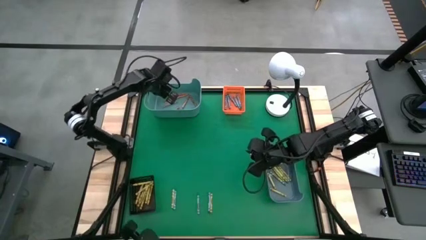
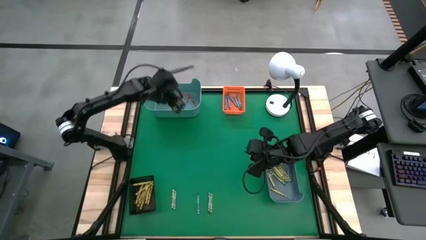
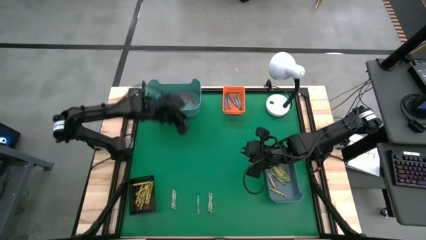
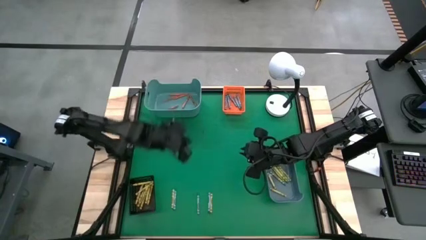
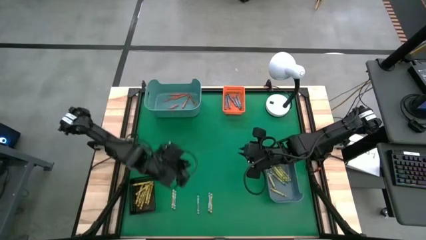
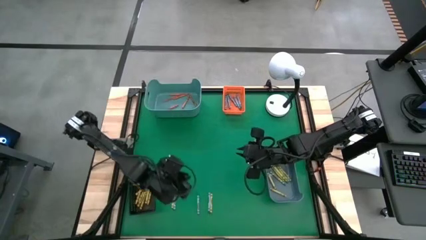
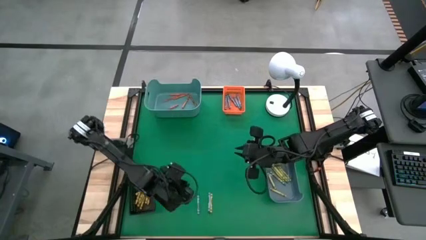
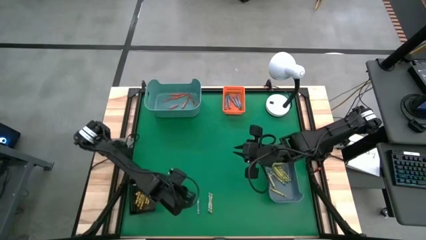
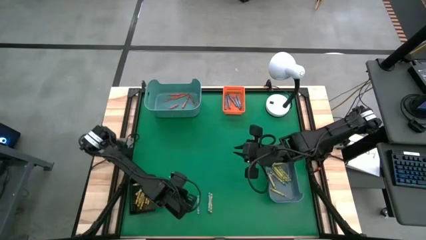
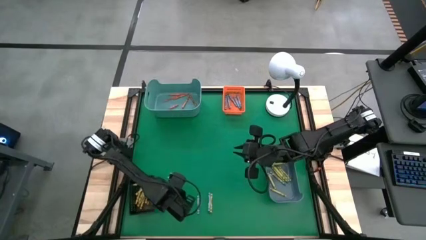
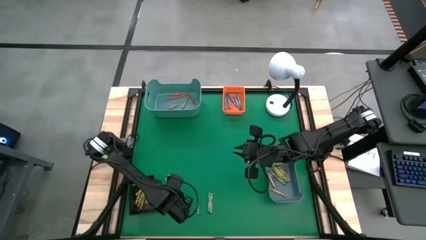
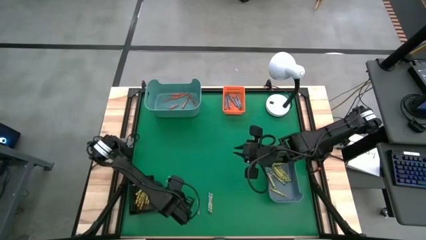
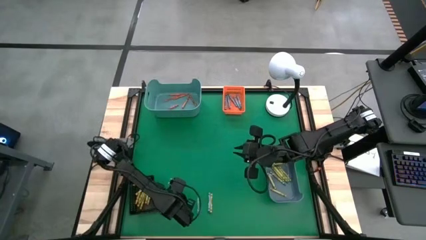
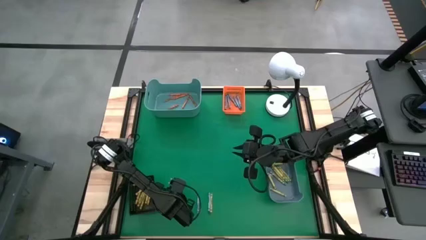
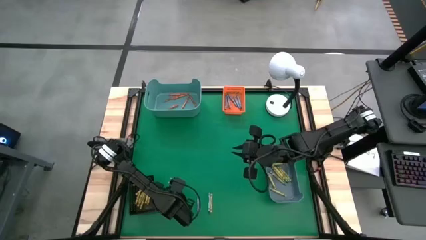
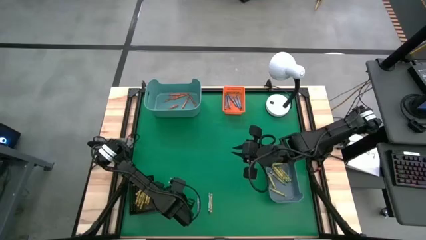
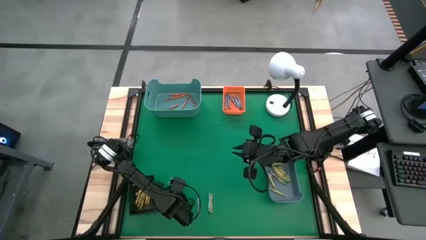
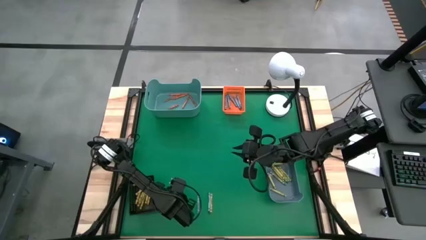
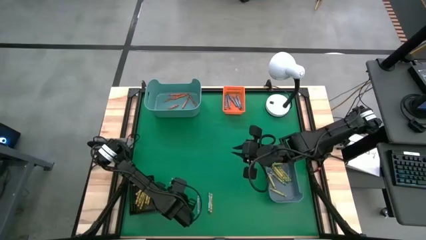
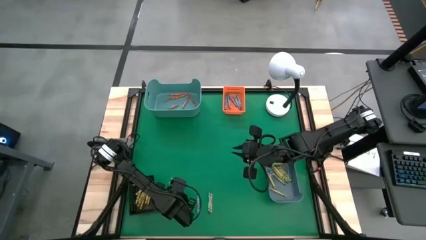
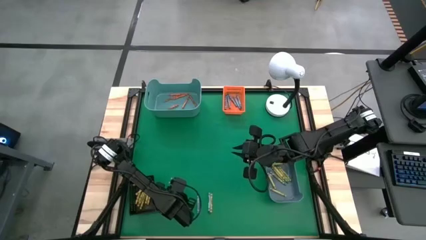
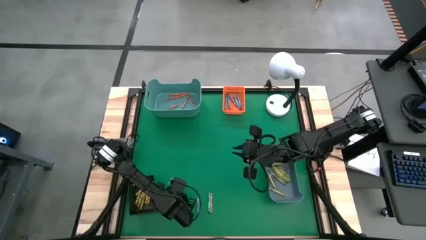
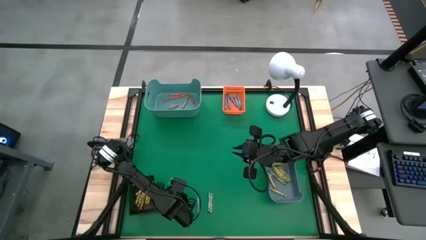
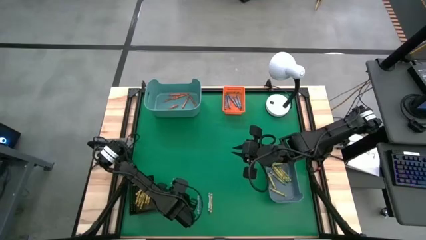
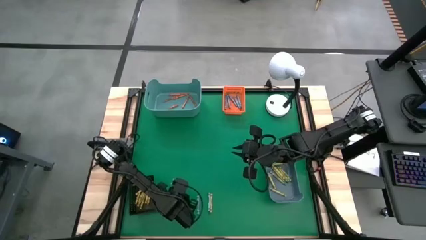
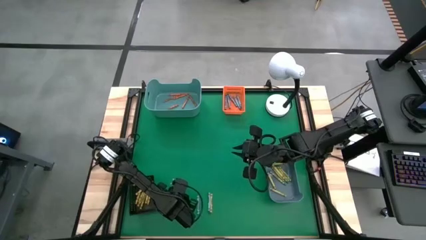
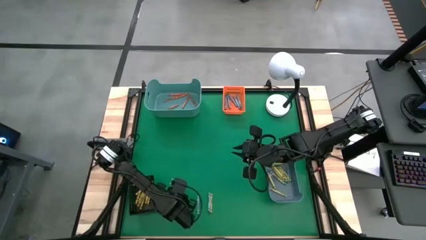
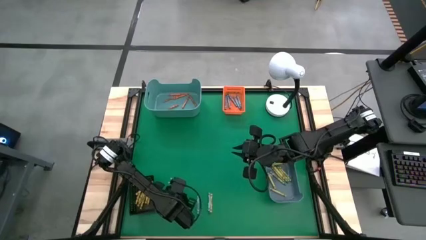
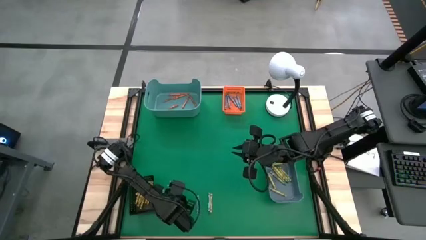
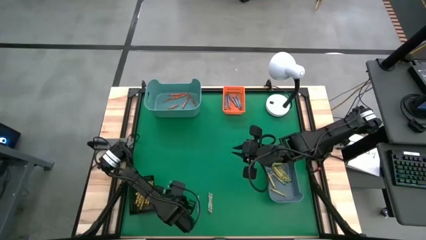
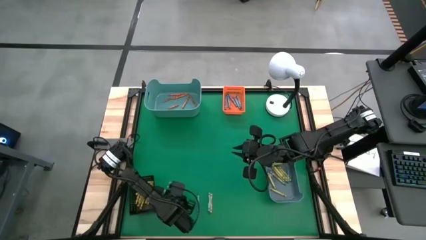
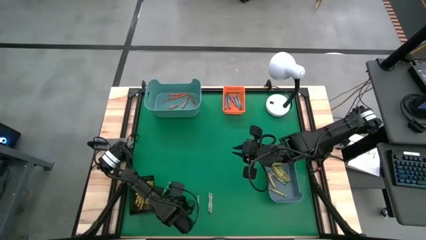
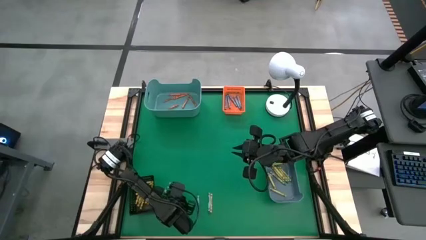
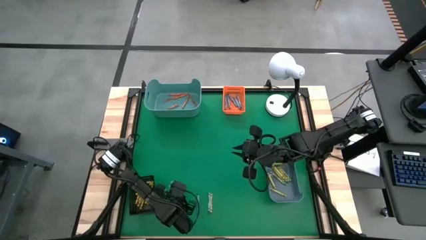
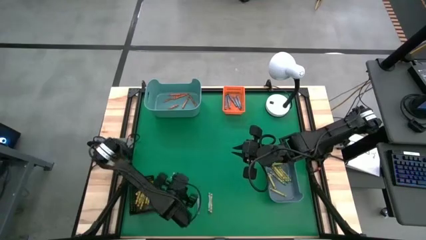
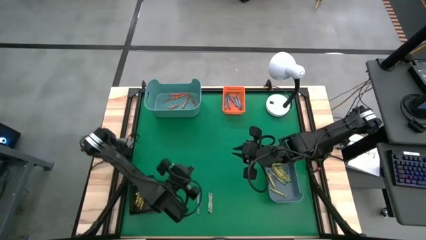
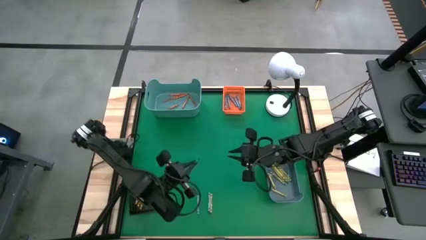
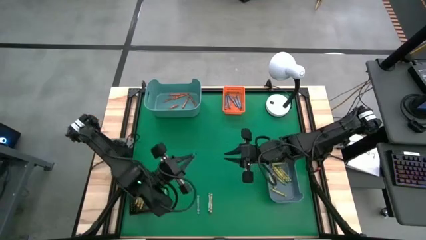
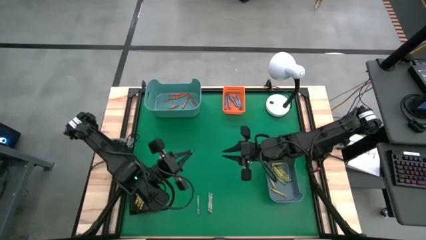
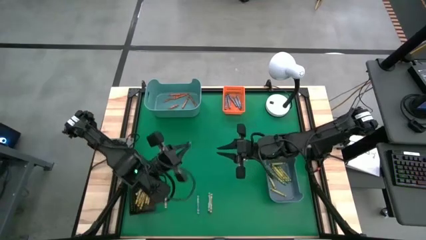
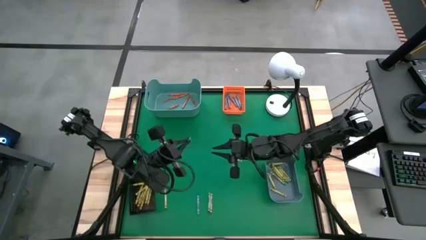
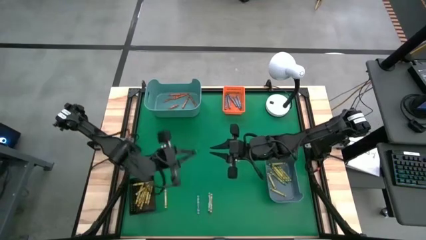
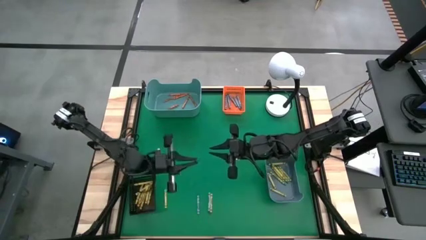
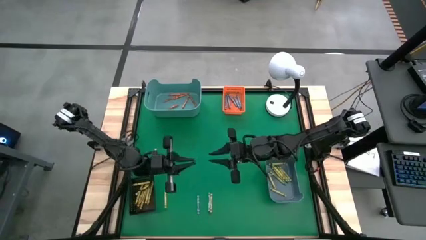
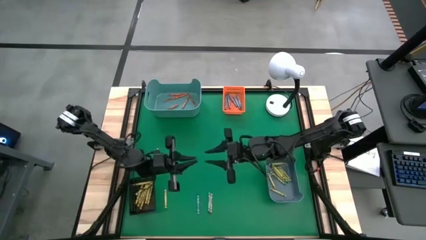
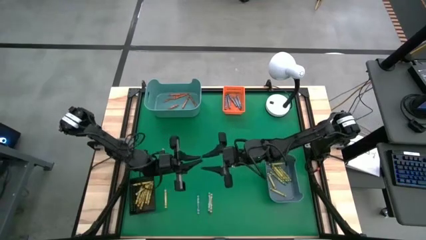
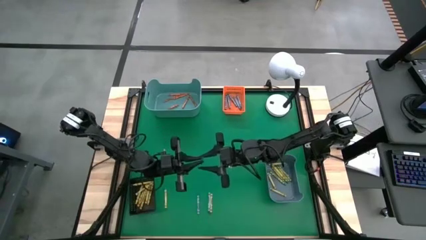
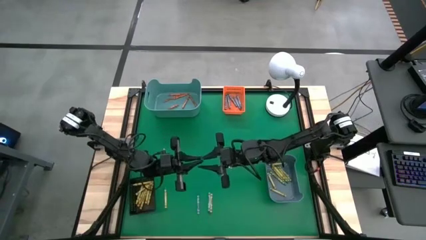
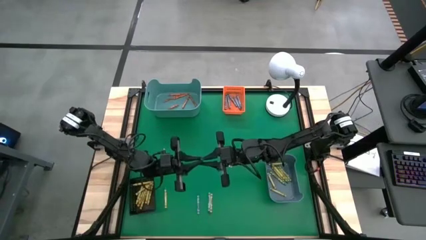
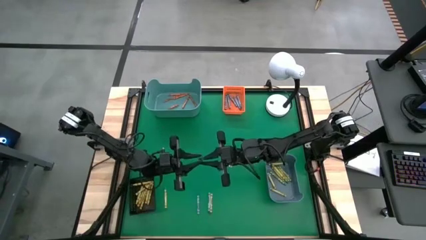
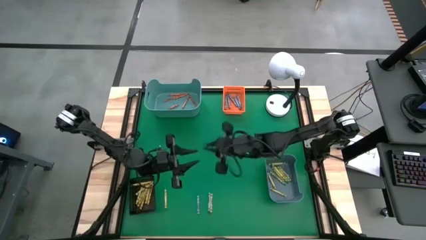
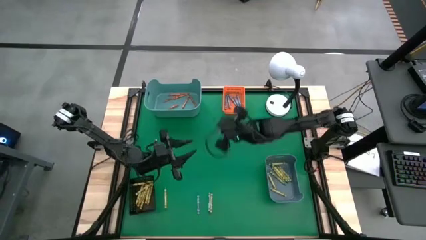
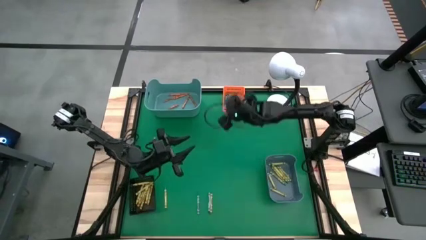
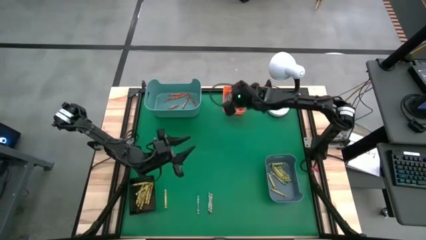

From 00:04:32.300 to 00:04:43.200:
Task: Sort crayons
Put the blue crayon into the orange bin

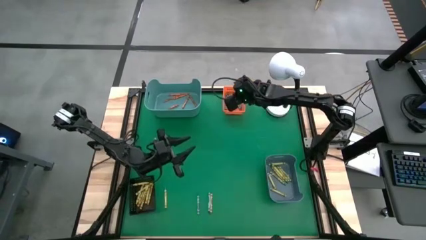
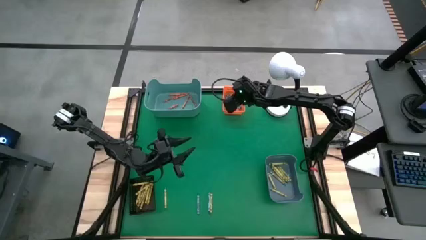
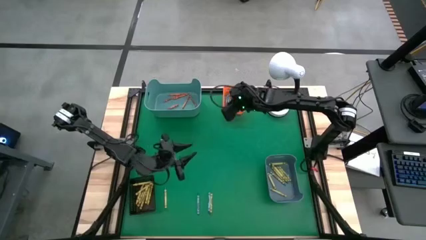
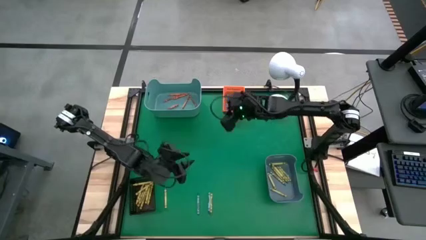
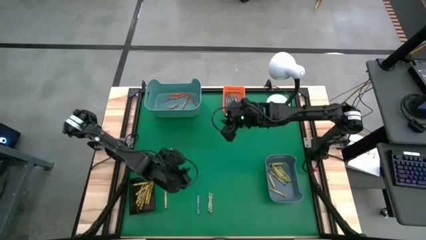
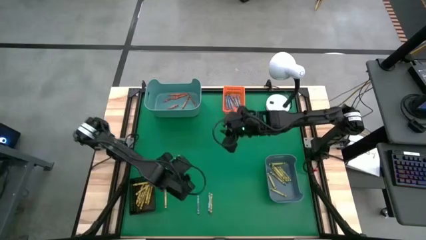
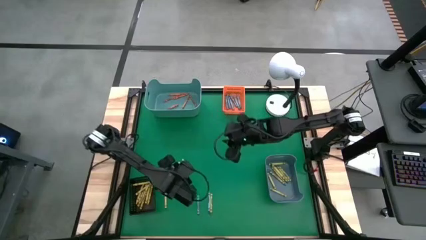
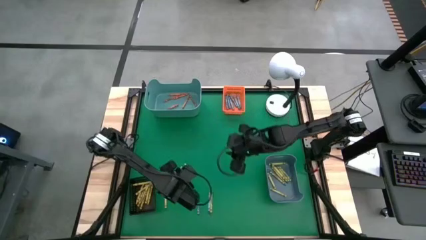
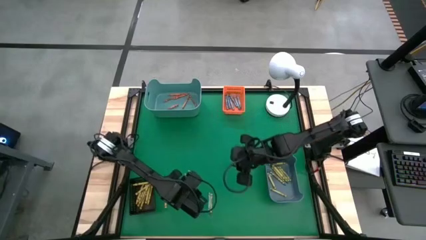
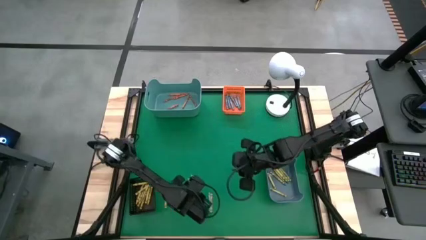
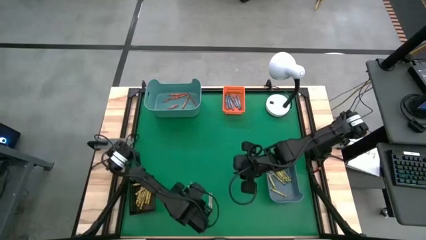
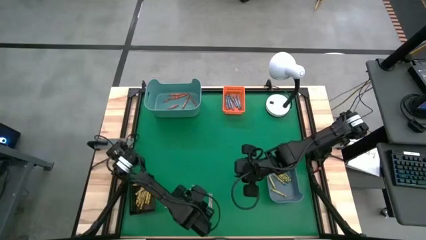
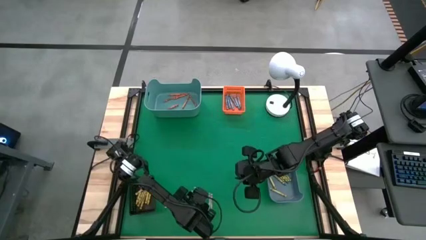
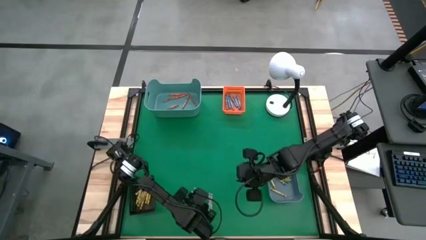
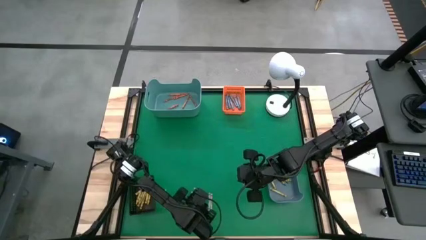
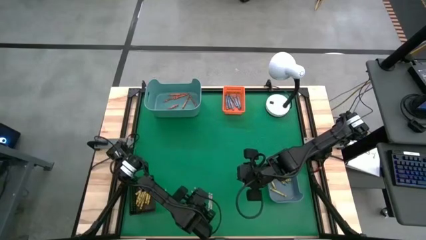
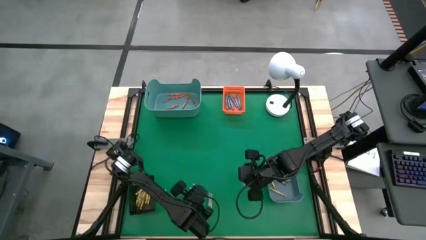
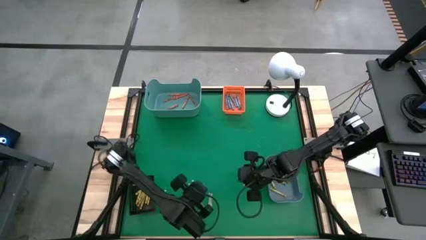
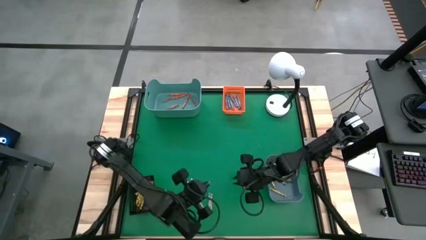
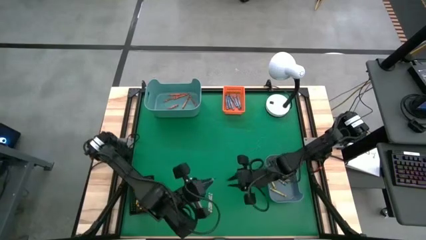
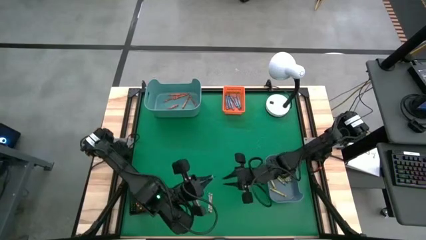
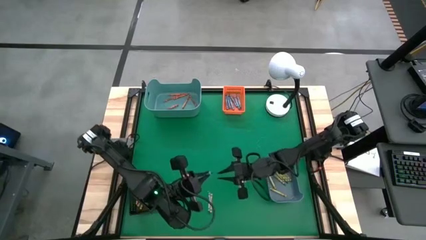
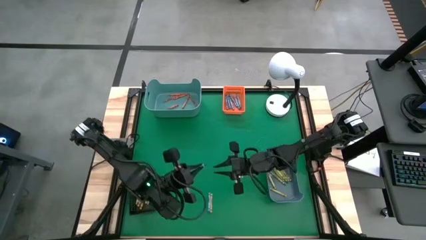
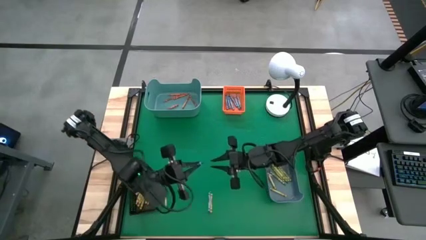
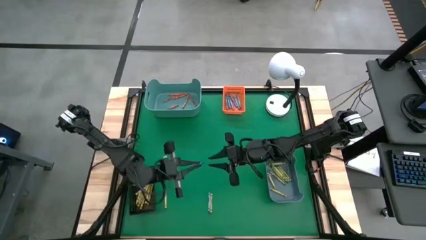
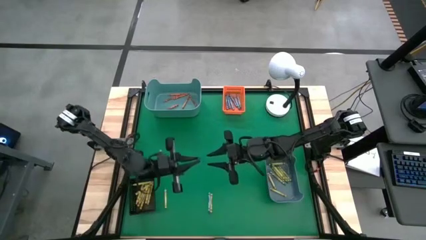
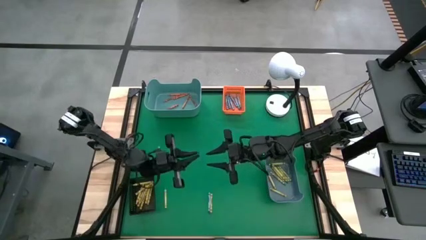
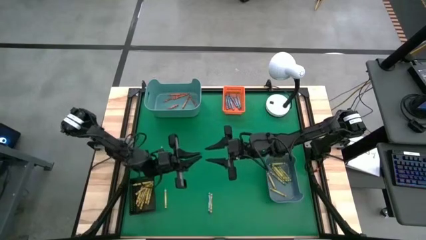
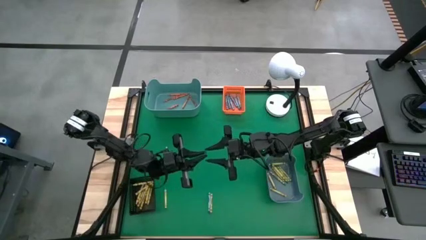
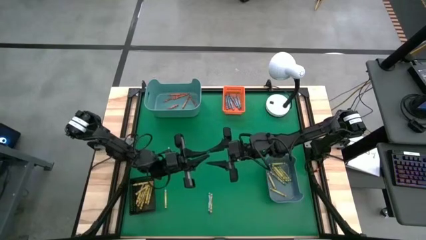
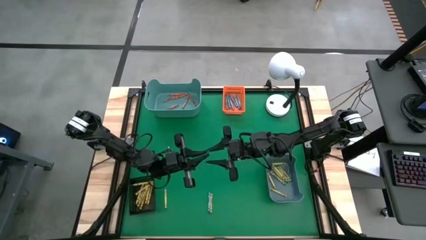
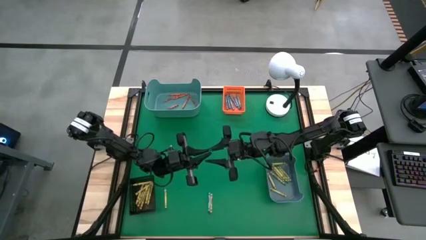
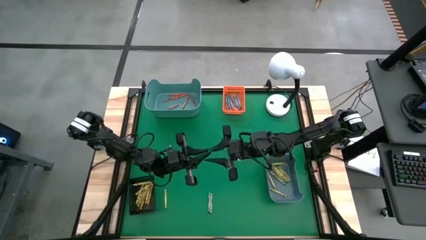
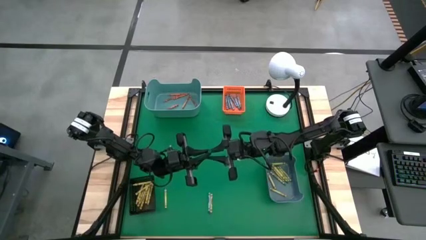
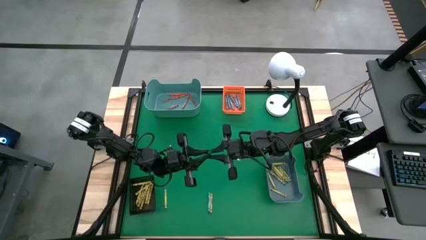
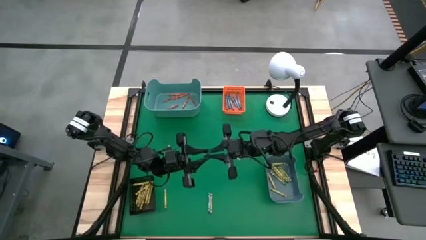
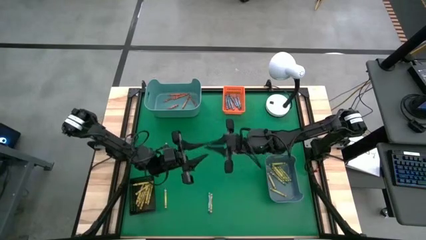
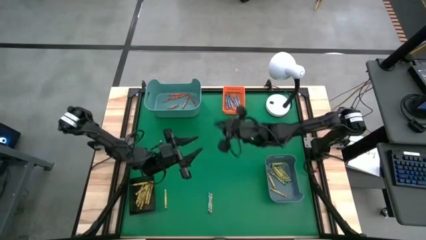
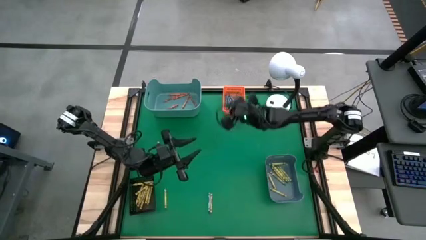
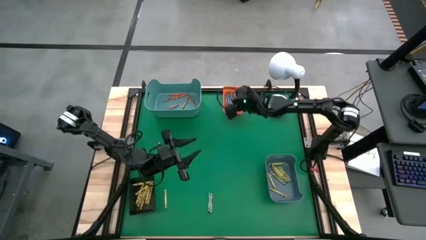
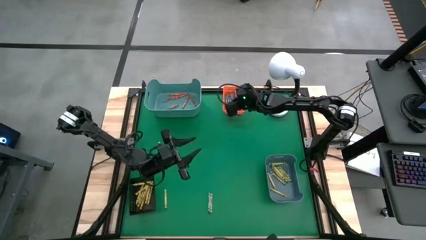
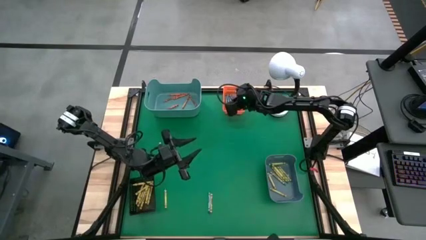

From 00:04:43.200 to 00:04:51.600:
Put the blue crayon into the orange bin
